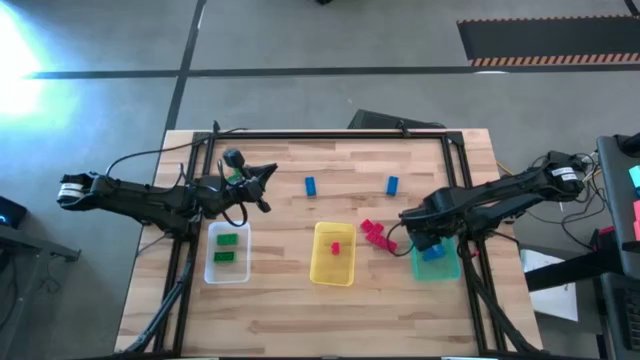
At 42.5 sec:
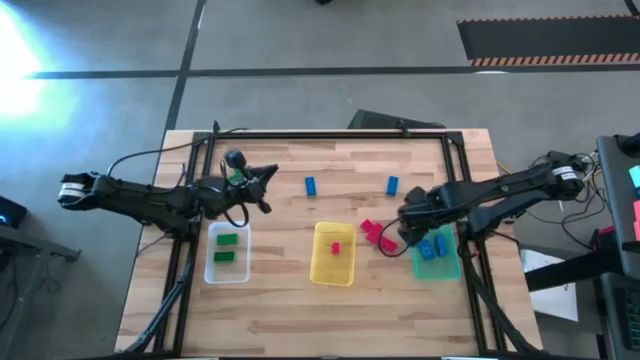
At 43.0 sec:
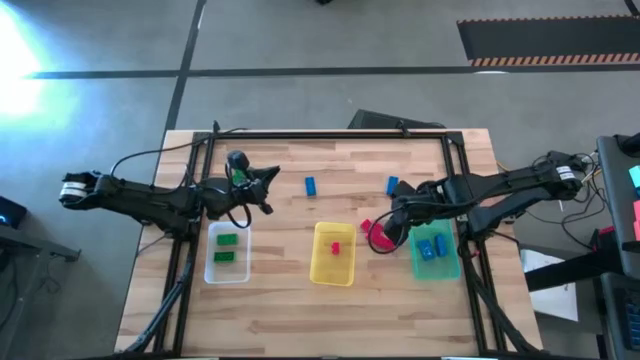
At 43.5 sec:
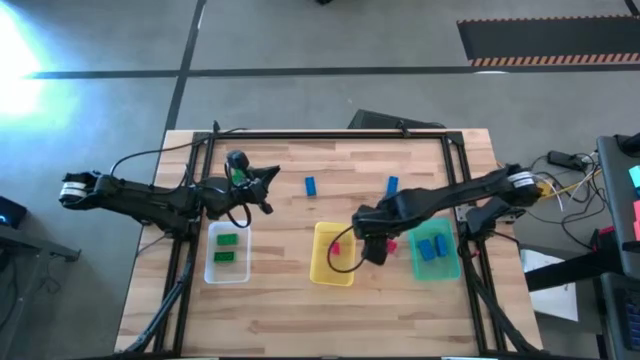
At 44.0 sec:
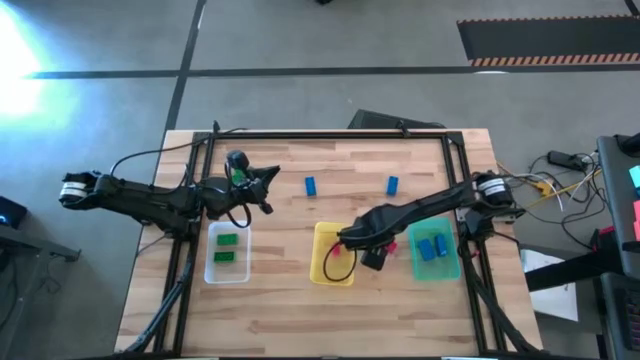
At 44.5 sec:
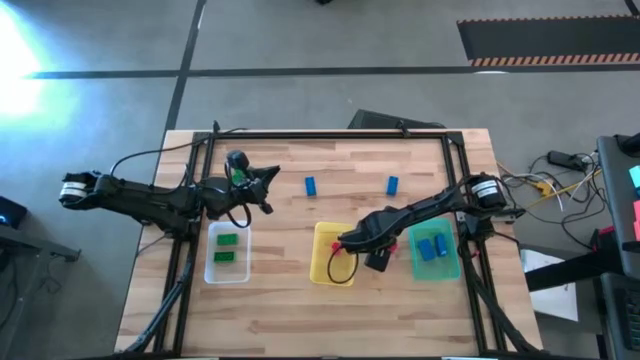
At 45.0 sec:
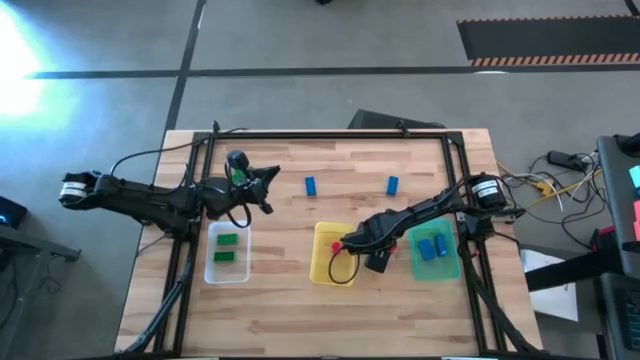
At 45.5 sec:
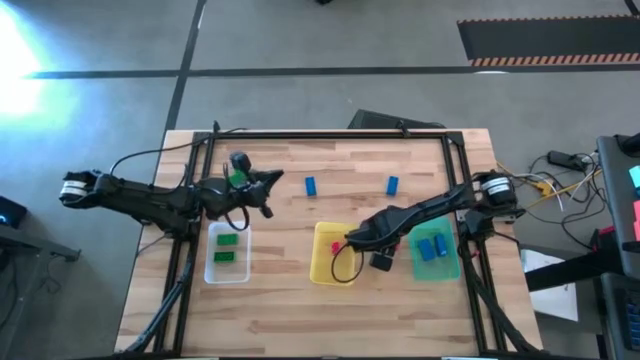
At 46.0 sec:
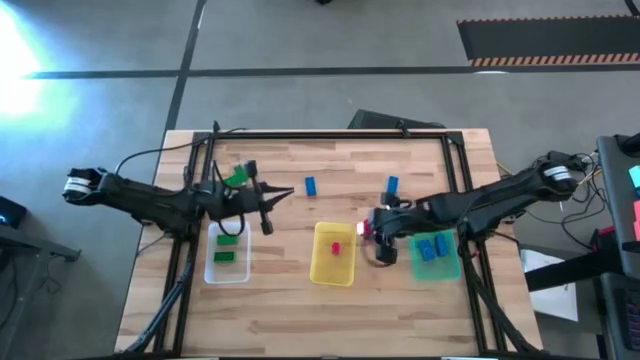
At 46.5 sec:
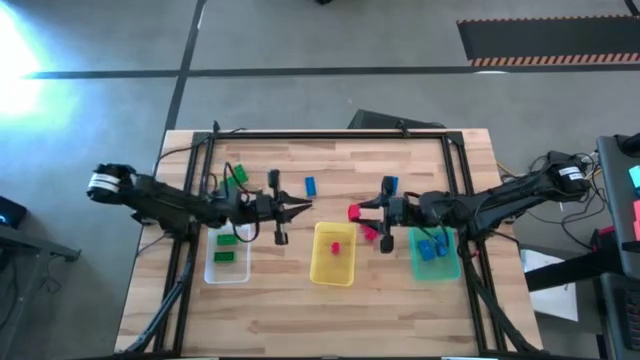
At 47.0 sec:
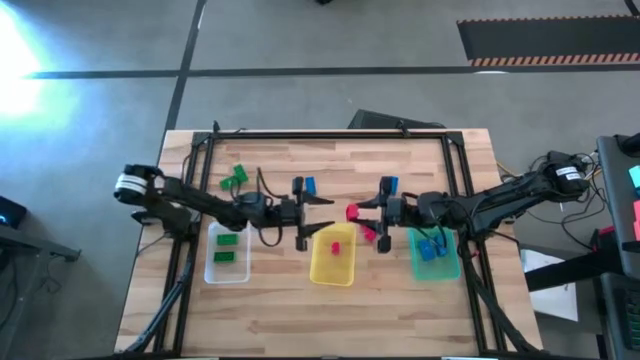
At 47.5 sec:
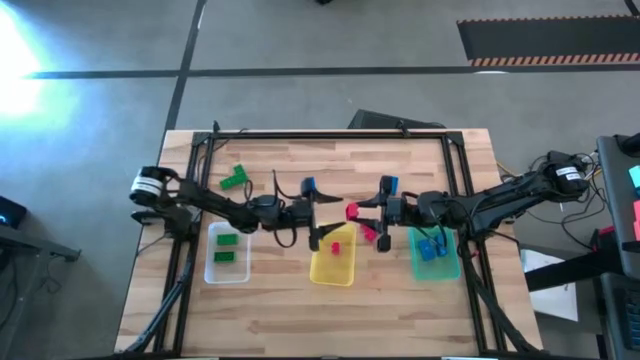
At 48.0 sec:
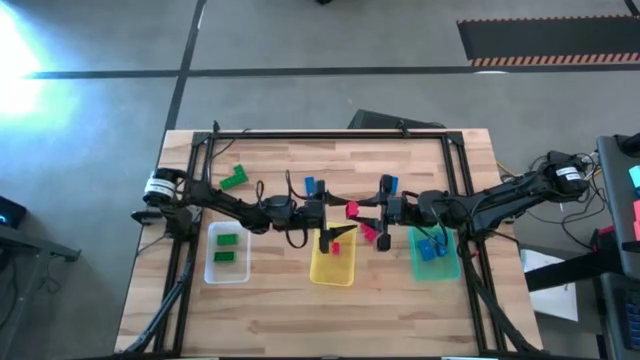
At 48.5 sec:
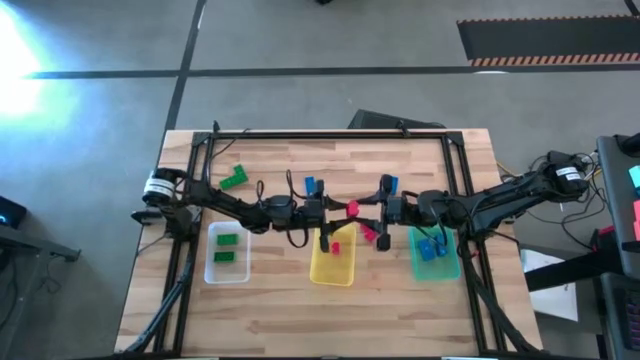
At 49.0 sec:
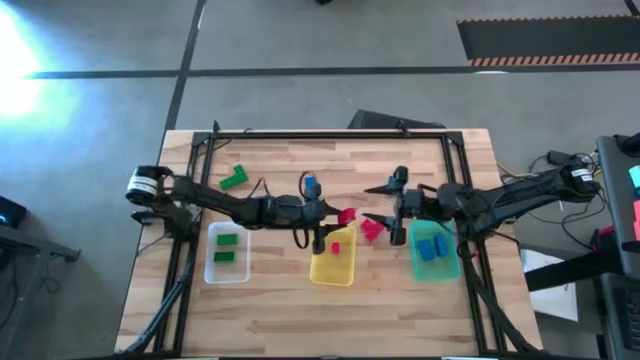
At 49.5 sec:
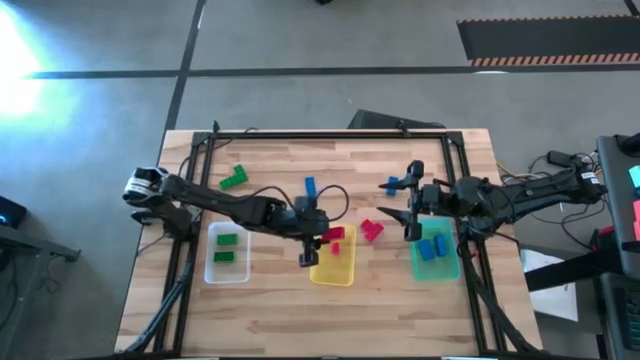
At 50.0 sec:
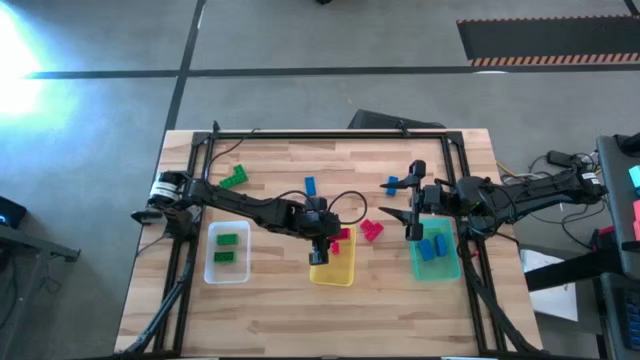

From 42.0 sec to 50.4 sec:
Task: Sort & place blocks by color
Put the red game piece into the yellow bin

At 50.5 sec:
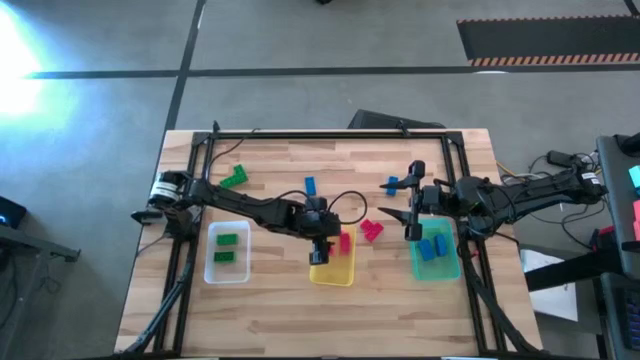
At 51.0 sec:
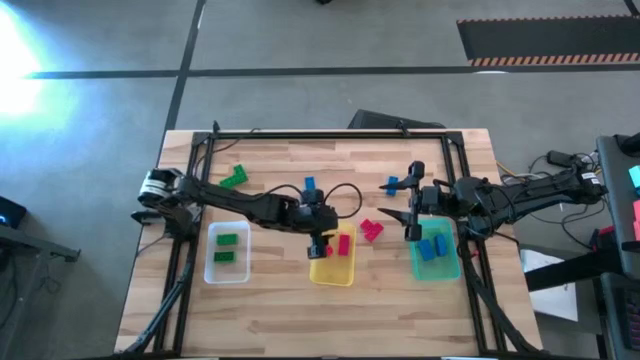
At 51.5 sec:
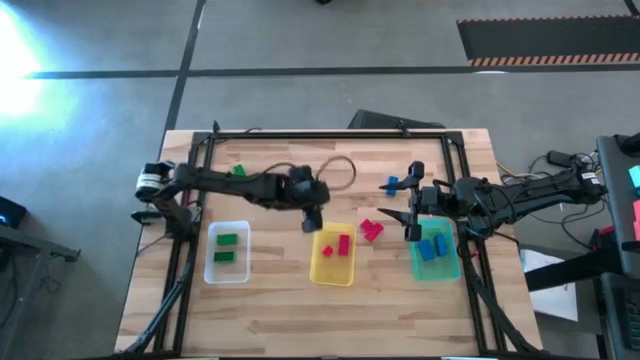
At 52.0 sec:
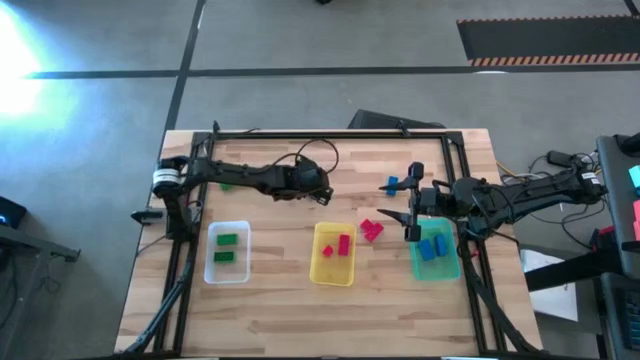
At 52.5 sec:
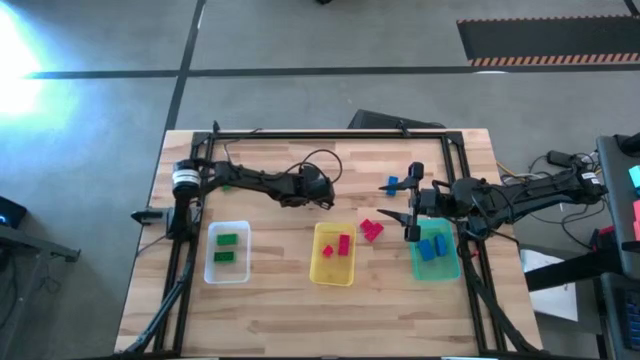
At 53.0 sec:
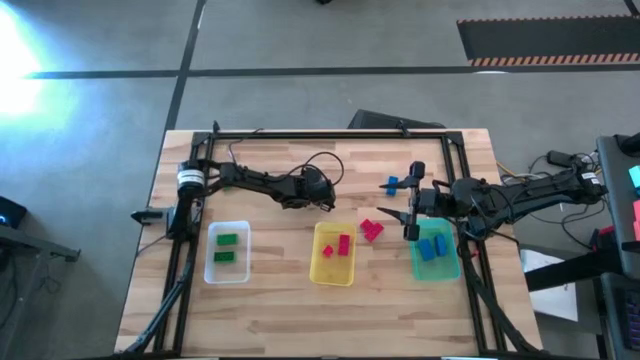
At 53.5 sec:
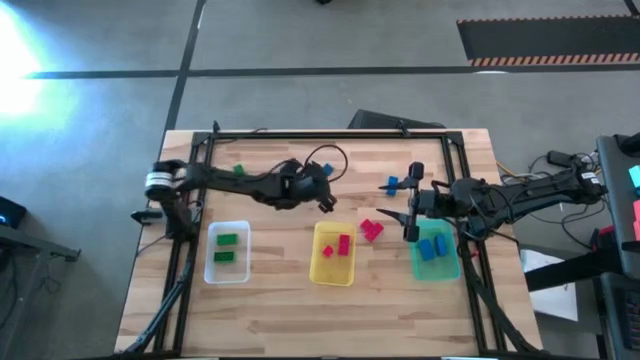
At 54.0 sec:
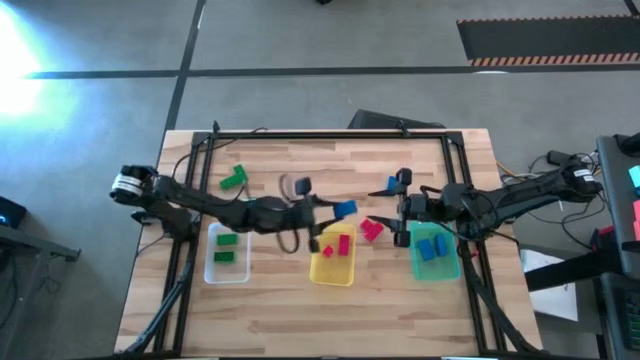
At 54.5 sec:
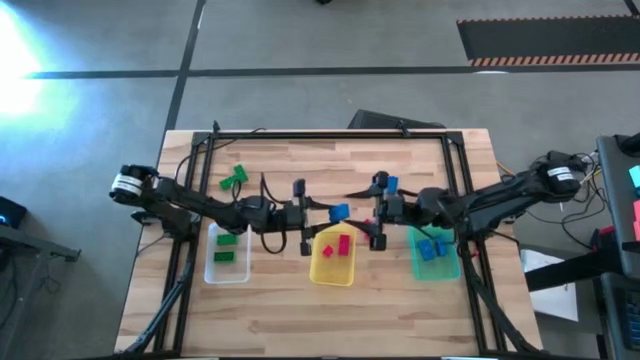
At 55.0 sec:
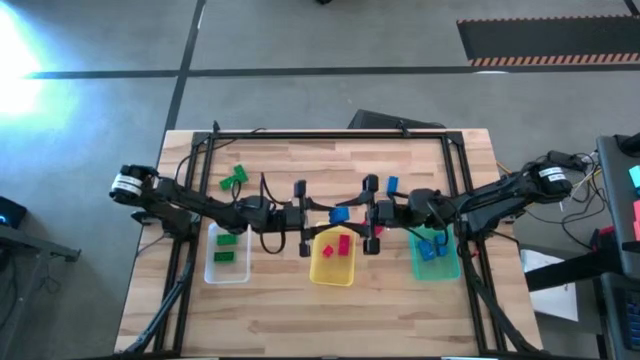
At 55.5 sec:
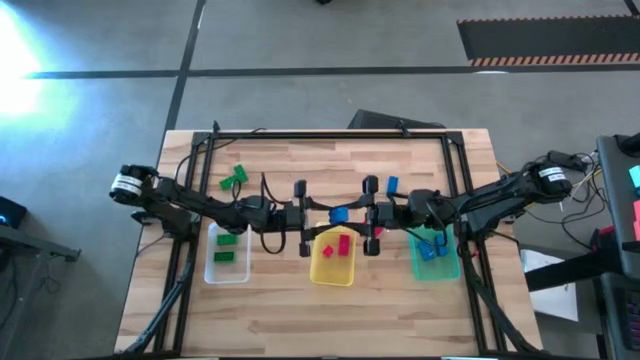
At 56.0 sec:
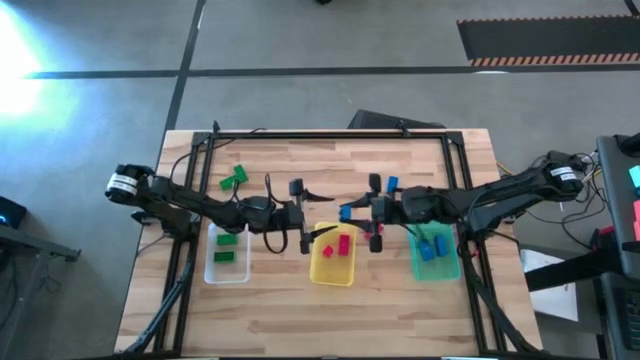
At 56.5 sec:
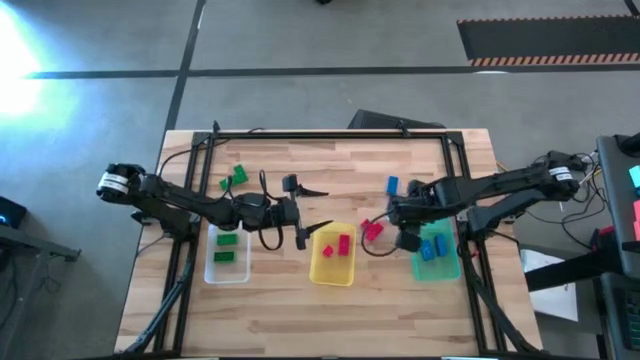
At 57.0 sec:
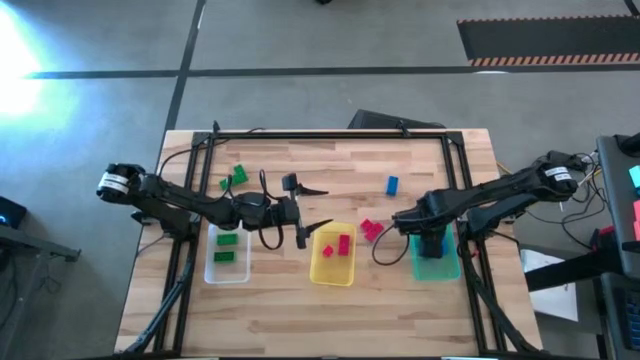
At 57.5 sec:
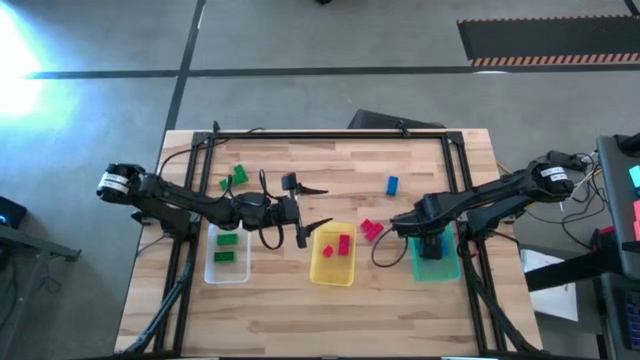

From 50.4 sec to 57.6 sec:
Put the blue game piece into the green bin

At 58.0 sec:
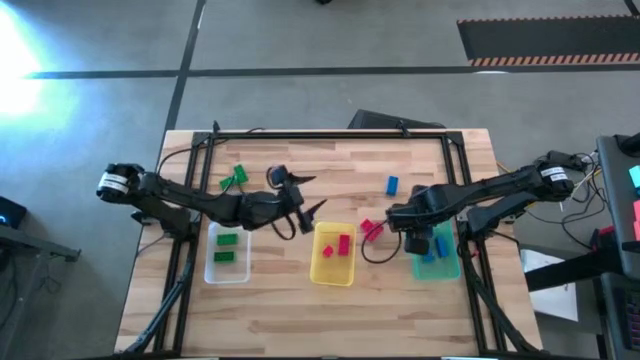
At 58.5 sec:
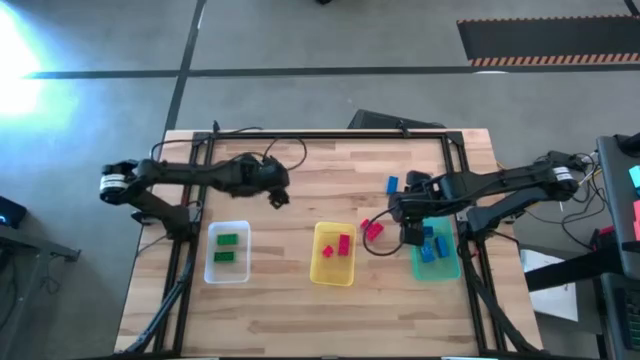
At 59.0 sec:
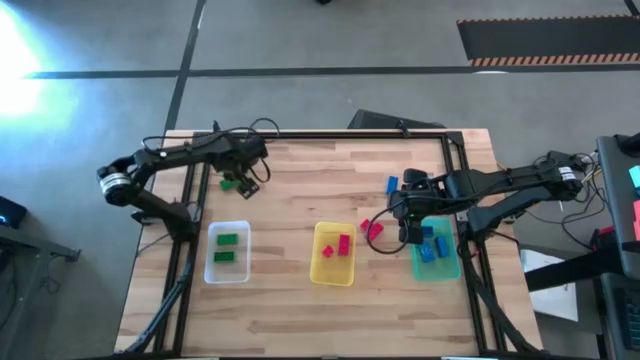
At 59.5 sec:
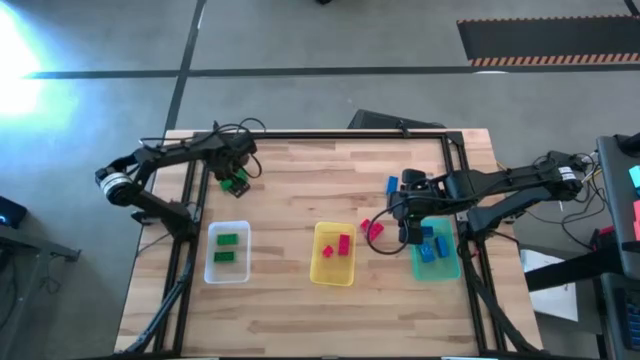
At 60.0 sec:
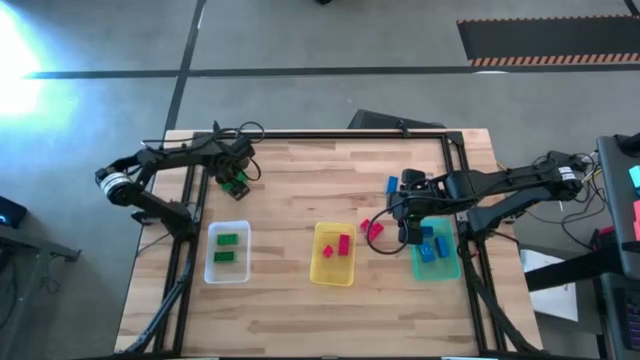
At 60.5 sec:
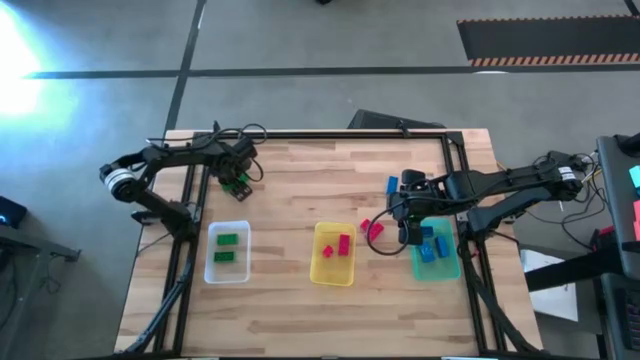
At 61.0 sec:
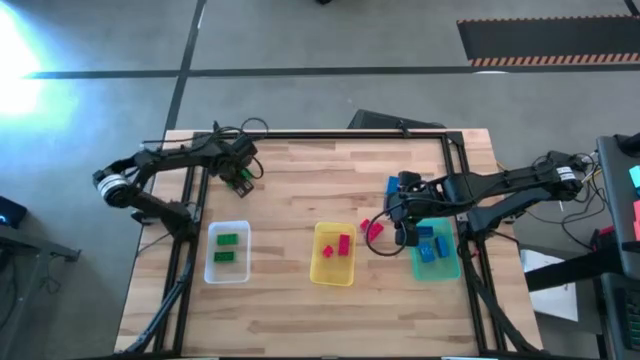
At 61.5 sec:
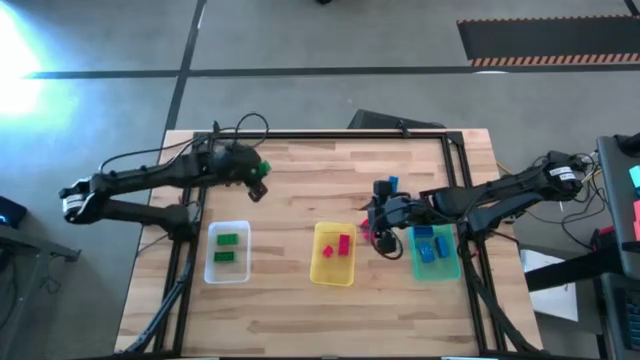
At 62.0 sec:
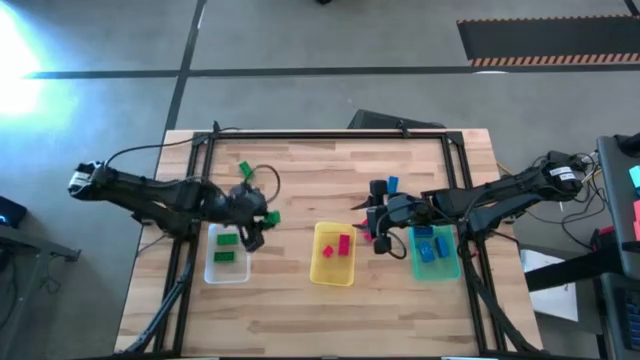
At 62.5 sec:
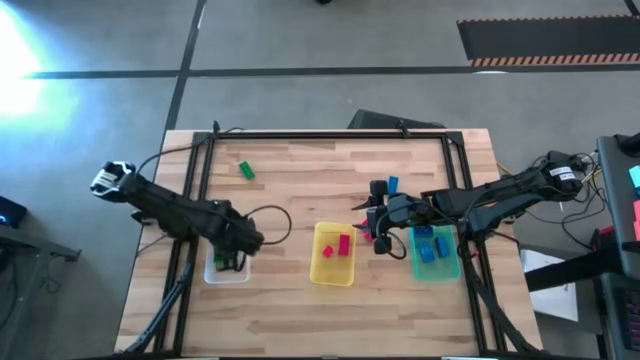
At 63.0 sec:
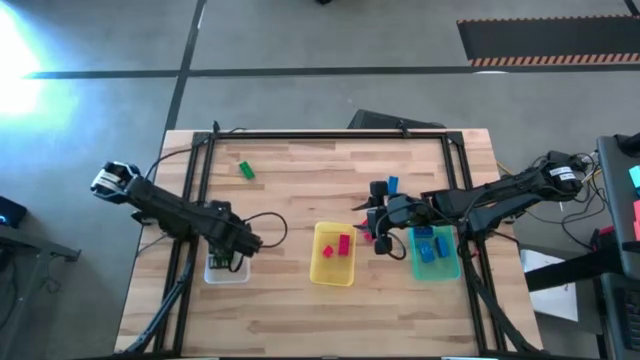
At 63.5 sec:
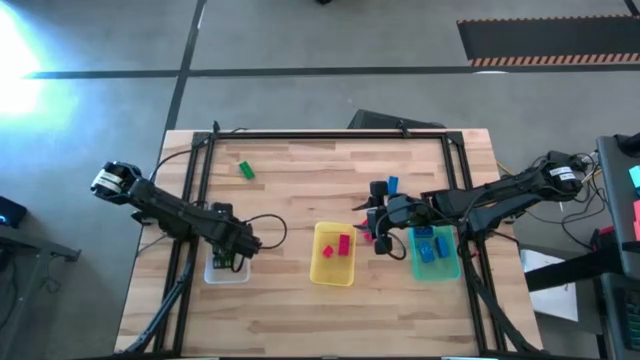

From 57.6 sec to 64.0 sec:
Put the green game piece into the transparent bin
